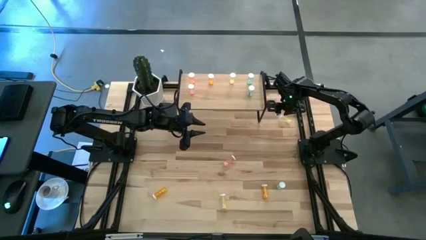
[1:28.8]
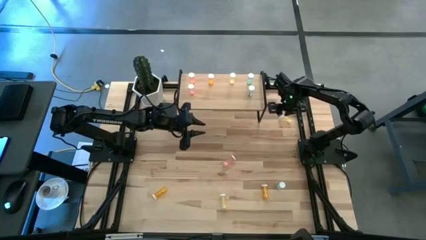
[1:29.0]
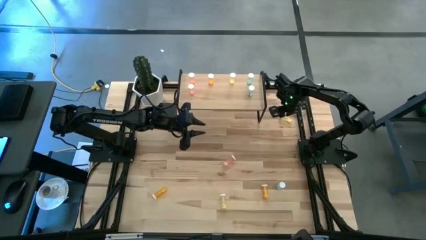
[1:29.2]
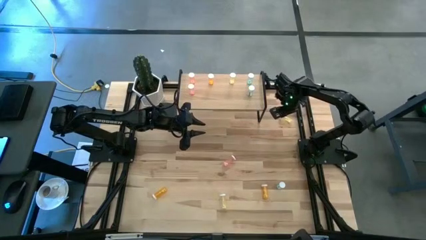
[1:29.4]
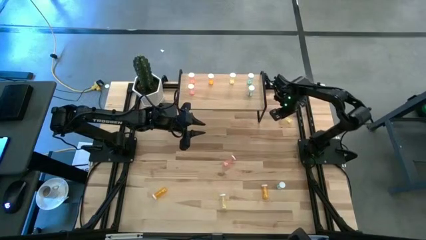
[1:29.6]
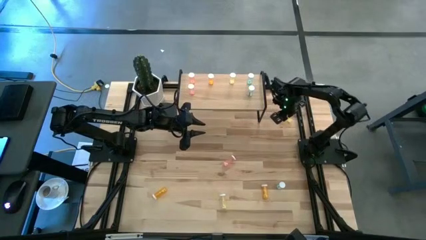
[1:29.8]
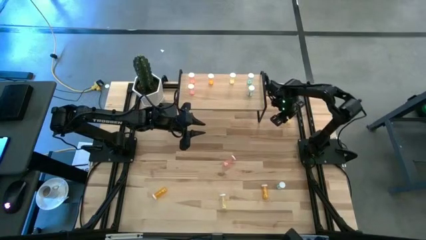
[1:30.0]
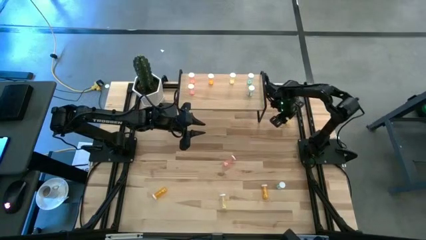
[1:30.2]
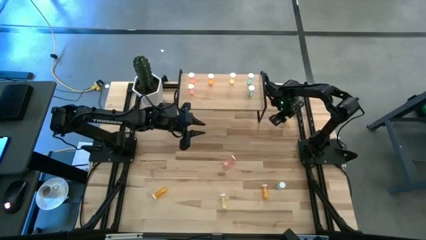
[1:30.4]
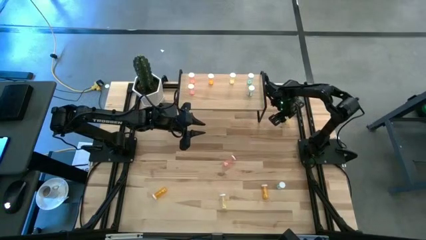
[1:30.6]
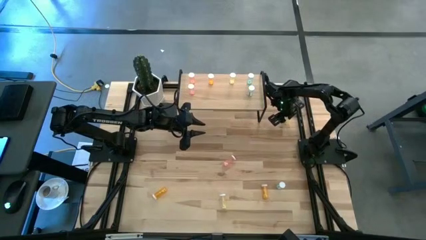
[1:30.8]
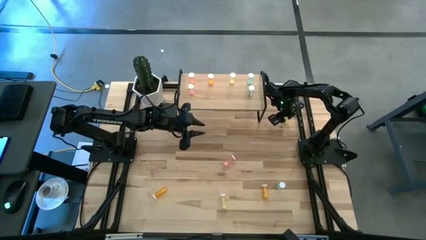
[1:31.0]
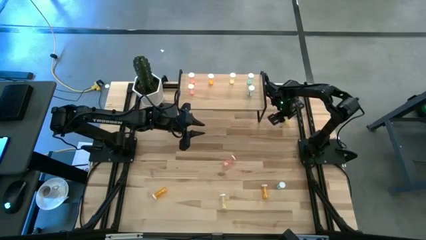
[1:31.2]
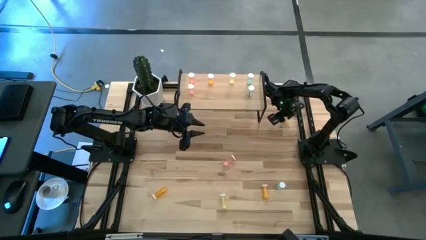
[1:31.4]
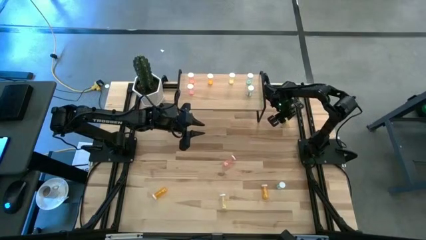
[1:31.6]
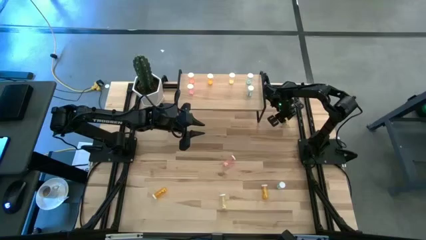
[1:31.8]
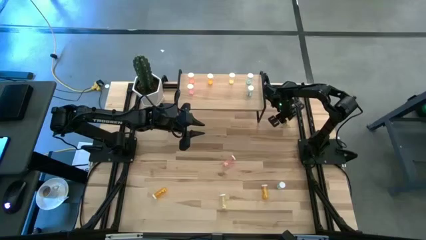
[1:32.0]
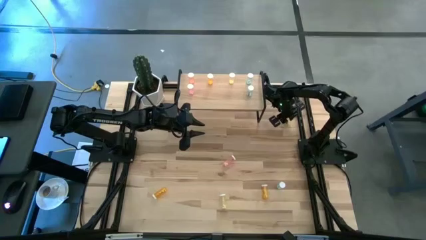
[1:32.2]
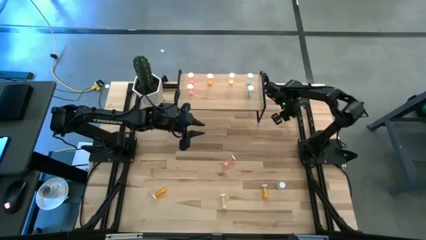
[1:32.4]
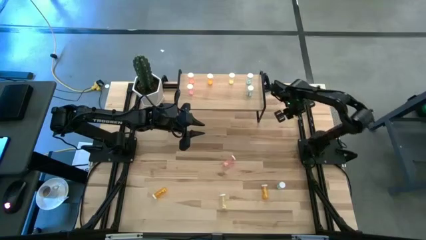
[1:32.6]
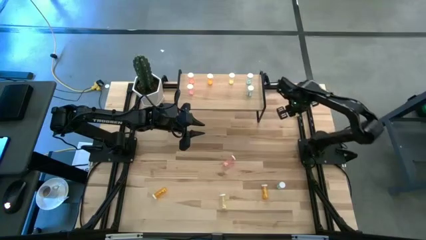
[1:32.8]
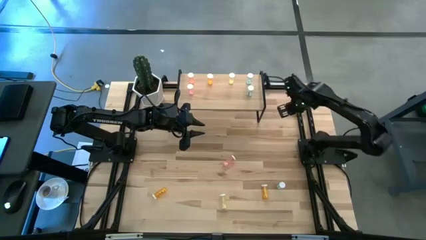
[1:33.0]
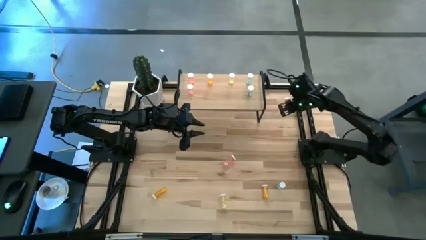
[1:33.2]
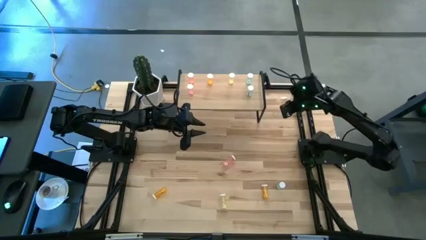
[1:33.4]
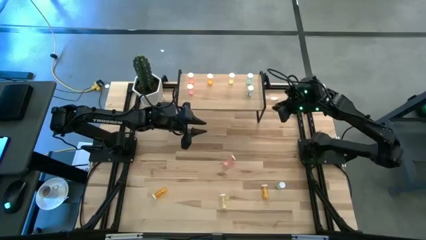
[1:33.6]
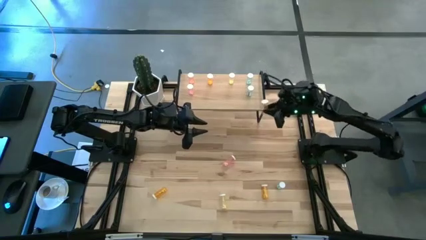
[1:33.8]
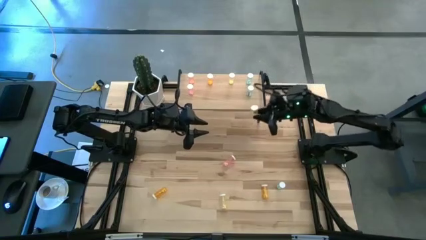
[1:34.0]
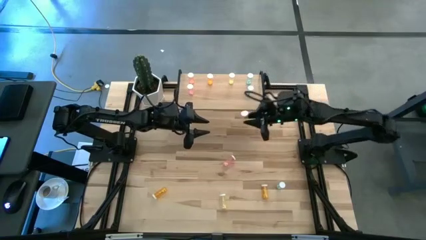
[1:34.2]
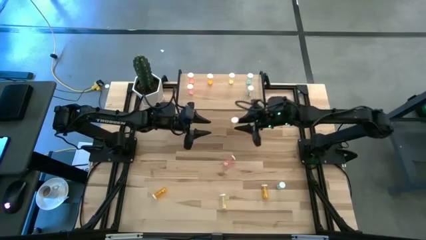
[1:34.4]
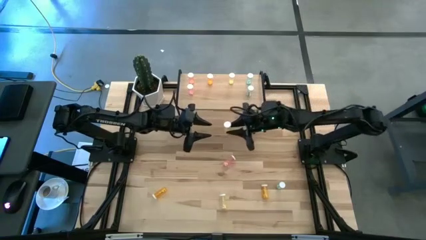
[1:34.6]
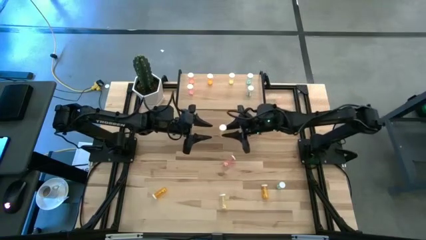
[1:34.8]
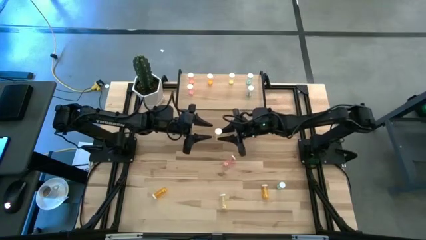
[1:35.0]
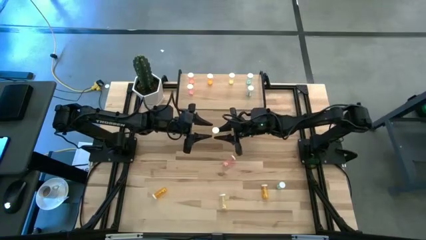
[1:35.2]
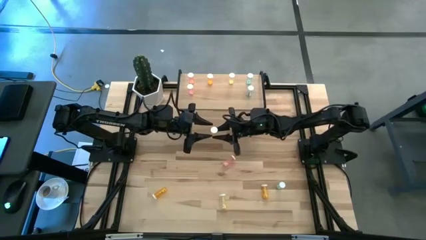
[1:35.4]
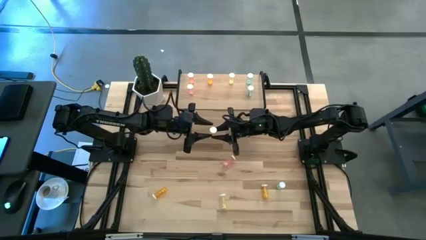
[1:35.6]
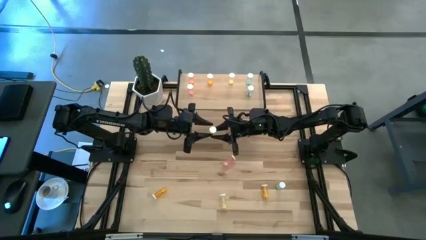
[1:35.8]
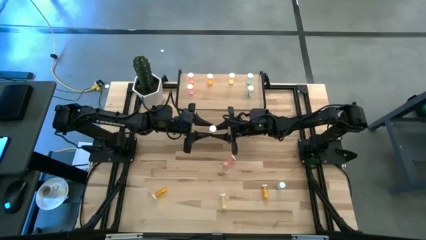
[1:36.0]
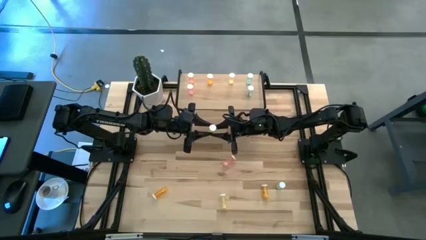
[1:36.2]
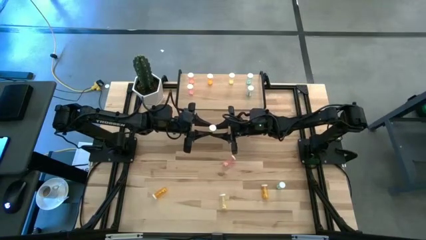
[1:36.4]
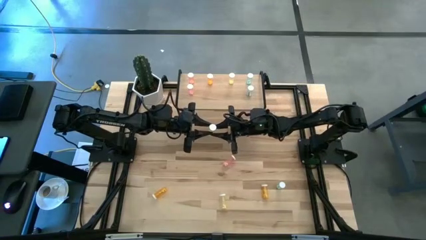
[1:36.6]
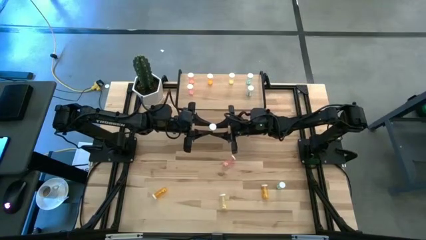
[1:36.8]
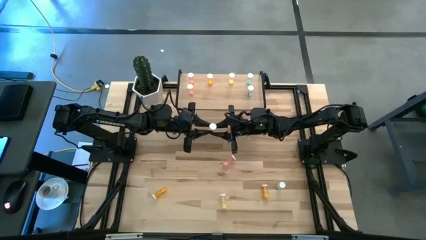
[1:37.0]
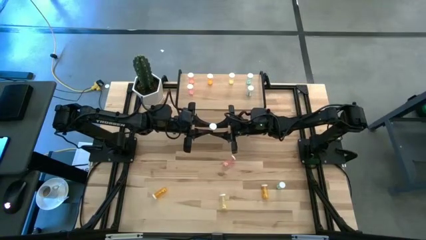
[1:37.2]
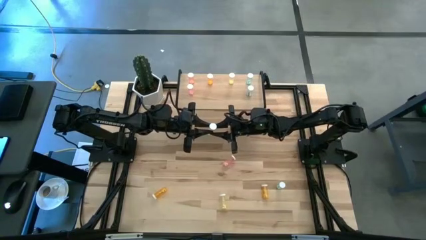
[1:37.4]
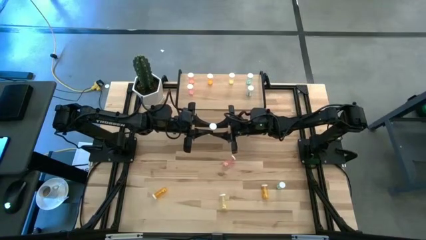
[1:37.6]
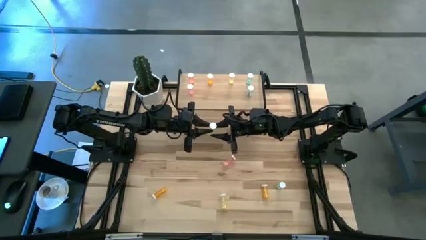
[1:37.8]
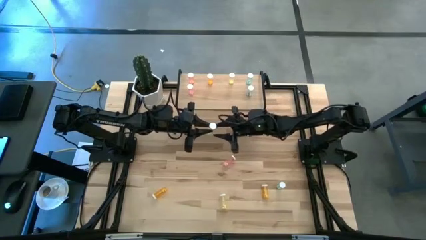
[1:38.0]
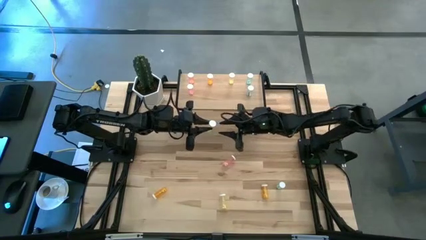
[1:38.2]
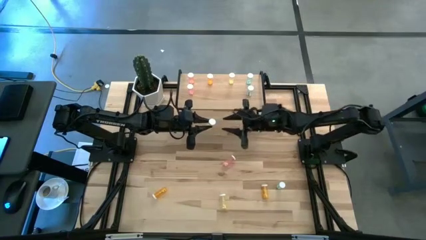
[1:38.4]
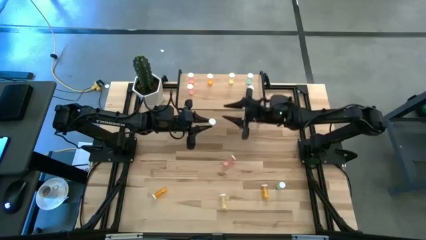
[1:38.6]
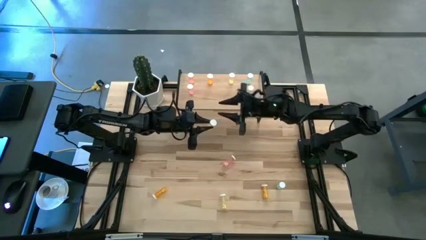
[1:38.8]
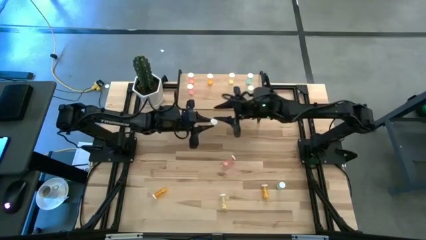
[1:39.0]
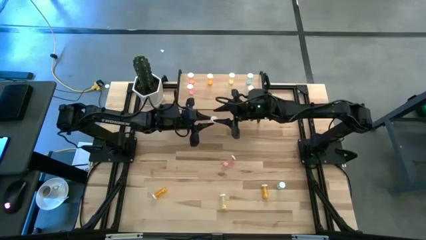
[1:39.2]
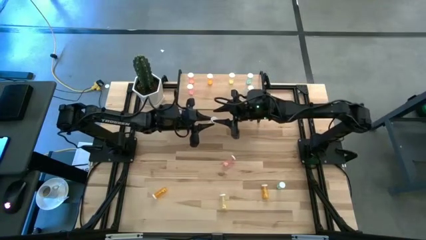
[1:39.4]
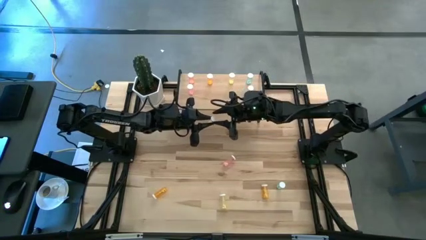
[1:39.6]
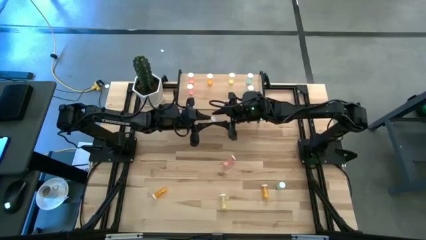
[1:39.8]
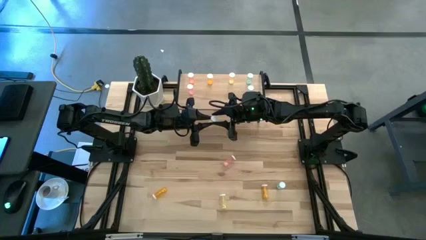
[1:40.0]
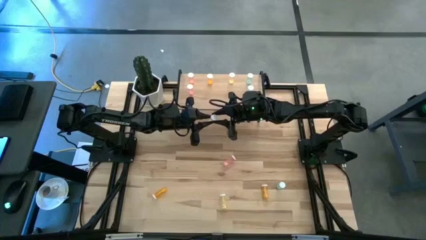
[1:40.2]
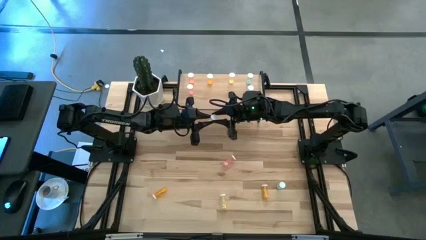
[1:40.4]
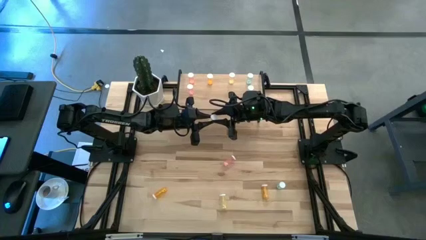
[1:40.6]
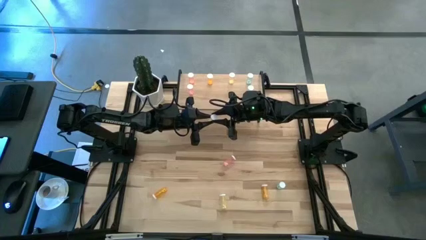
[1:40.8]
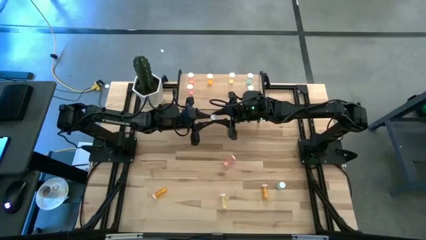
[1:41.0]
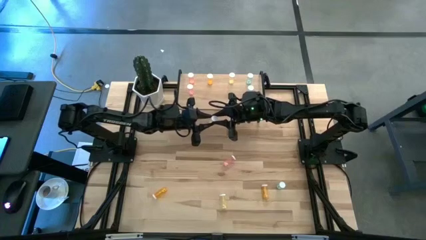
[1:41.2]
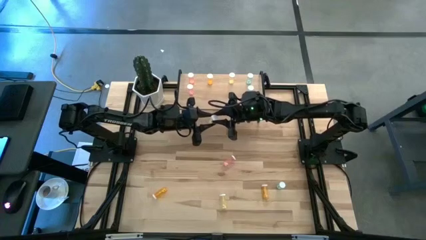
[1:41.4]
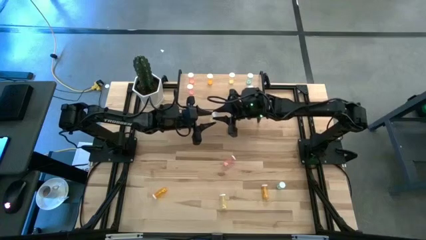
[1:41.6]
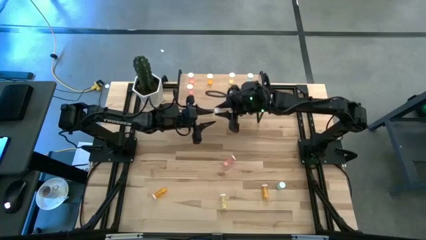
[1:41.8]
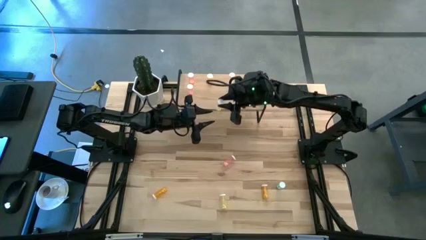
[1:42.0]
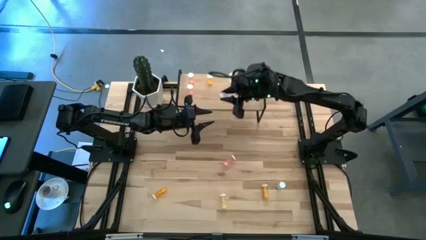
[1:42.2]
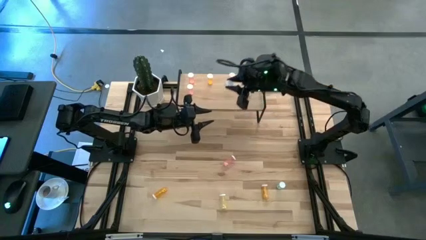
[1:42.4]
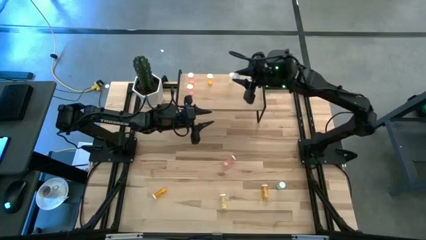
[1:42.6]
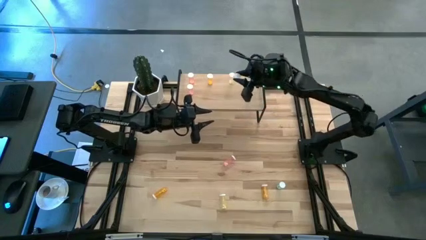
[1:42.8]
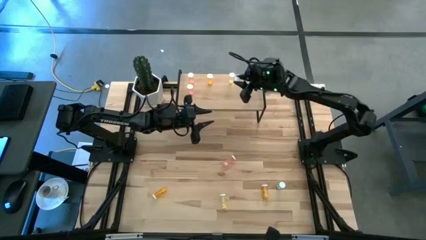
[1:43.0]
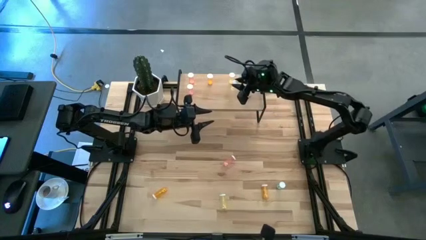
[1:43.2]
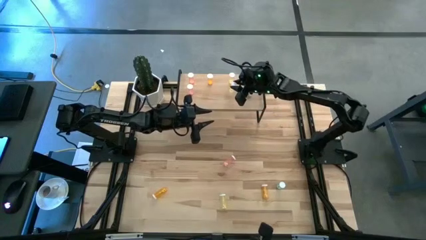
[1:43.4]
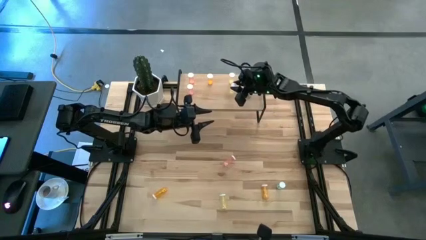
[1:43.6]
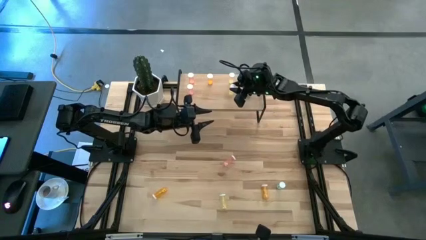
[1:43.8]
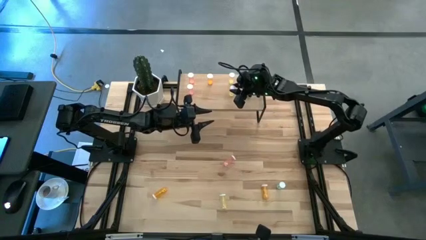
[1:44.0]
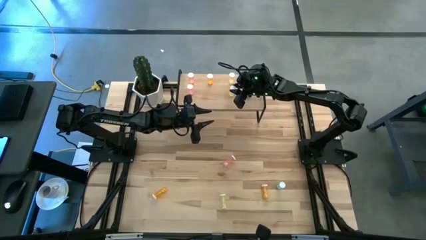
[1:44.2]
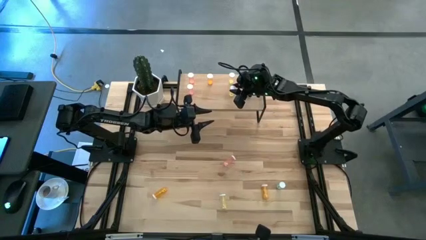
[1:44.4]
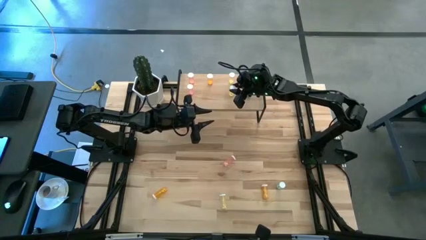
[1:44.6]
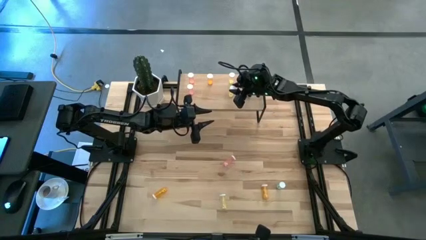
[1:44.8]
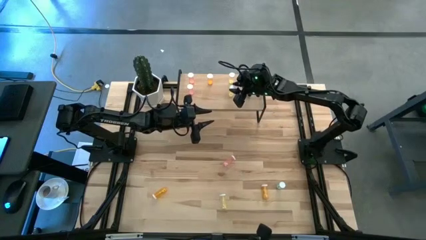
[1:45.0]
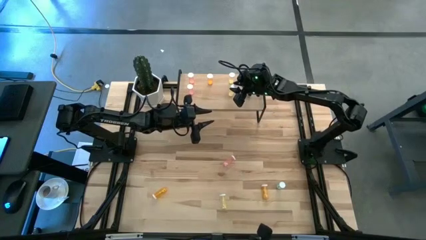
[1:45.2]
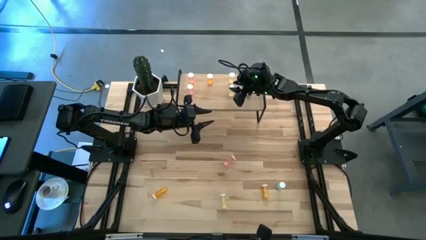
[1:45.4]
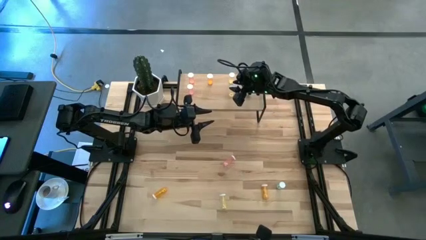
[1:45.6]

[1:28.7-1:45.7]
Task: Pick and place medicine bottles onto shelf by color
Put the top yellow pill bottle aligned with the other yellow pill bottle on the shelf
